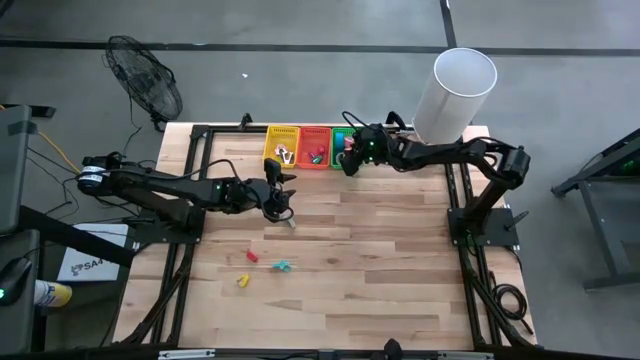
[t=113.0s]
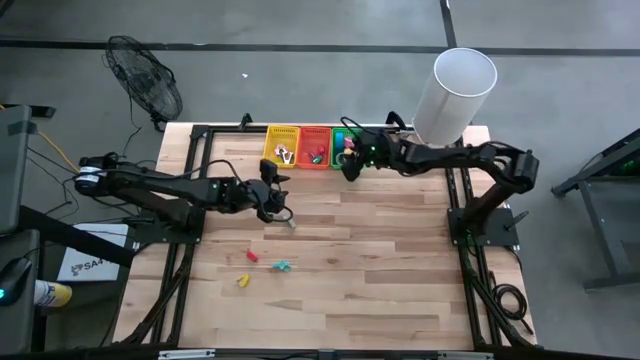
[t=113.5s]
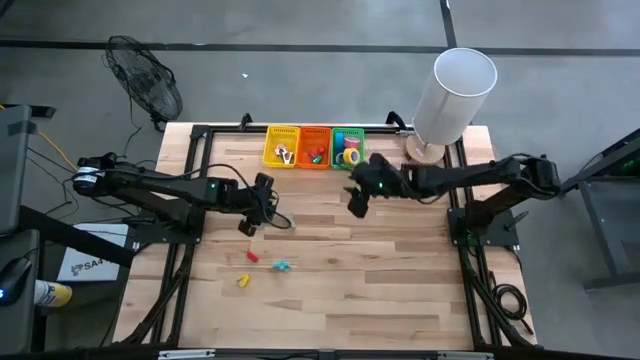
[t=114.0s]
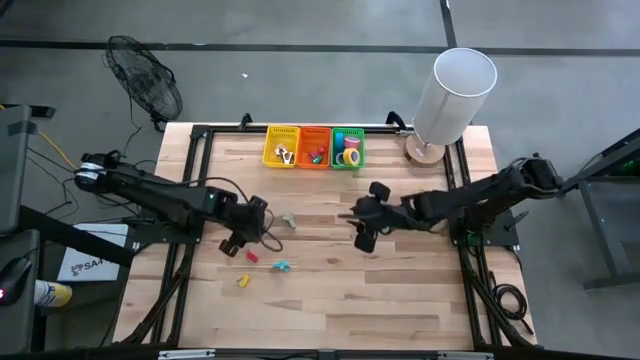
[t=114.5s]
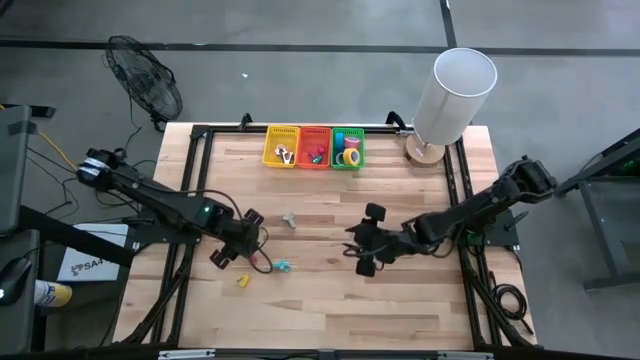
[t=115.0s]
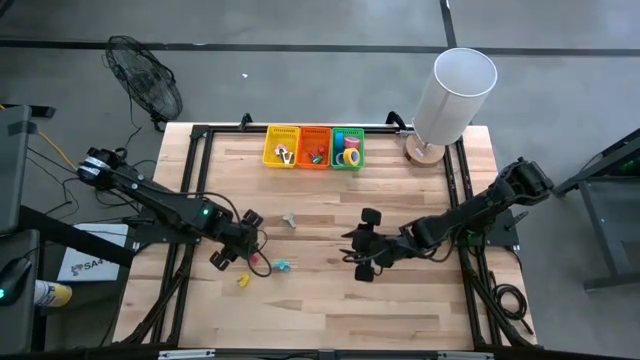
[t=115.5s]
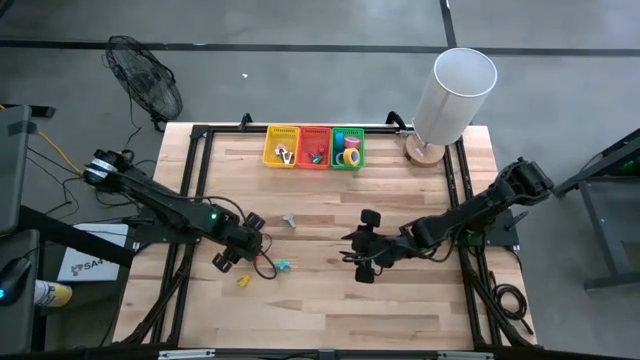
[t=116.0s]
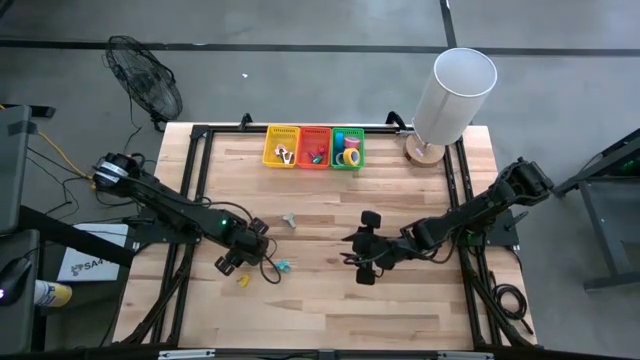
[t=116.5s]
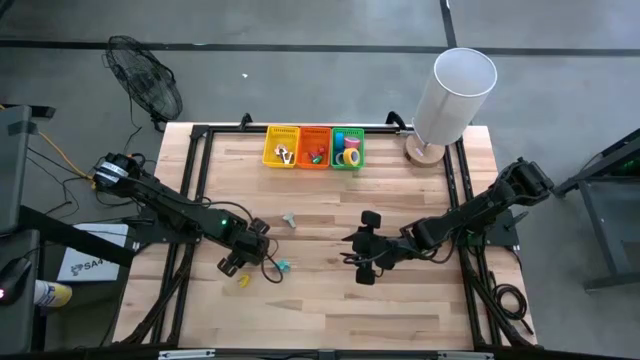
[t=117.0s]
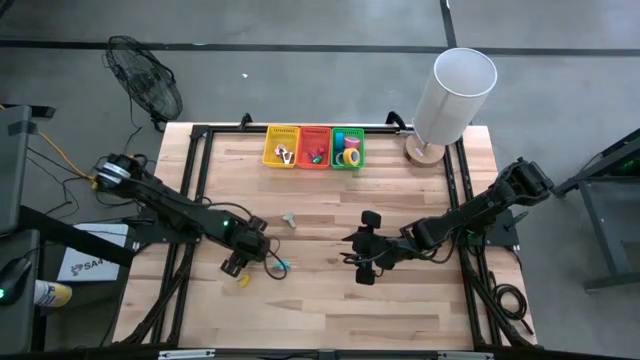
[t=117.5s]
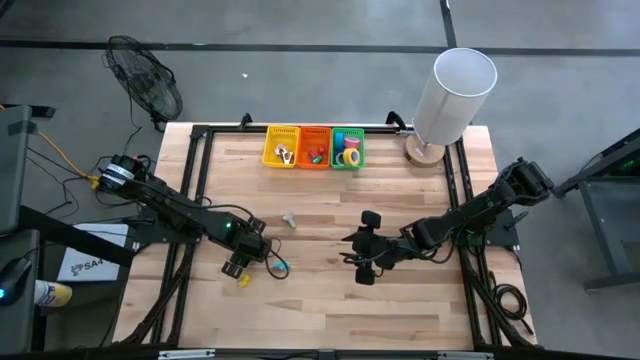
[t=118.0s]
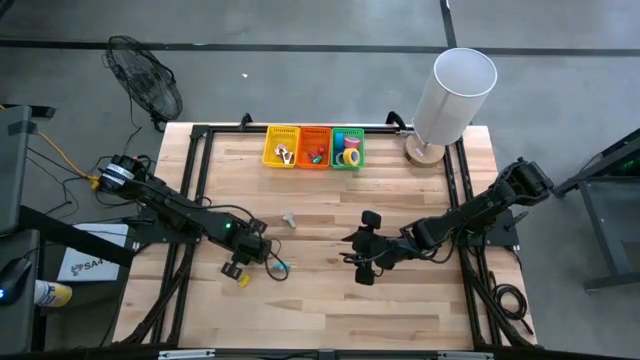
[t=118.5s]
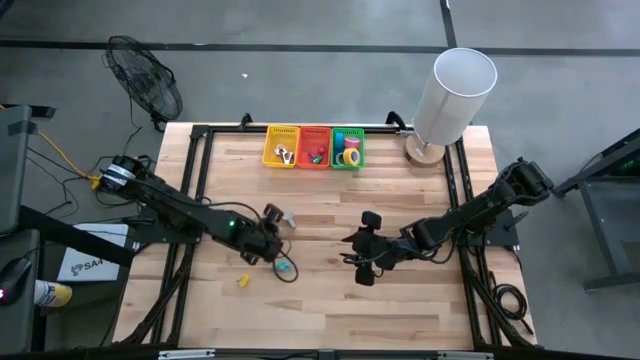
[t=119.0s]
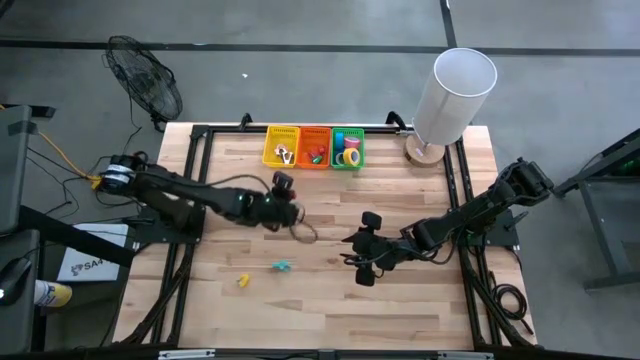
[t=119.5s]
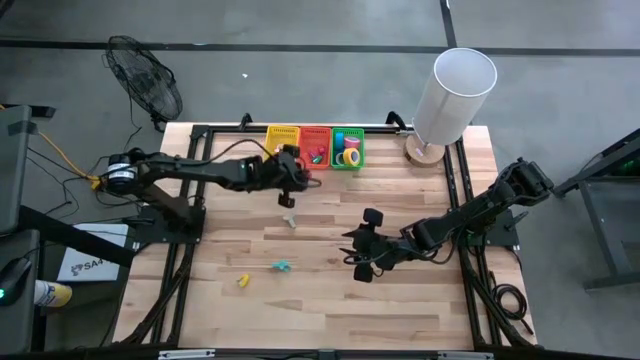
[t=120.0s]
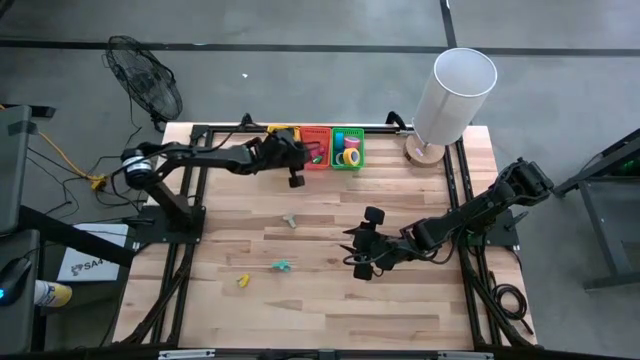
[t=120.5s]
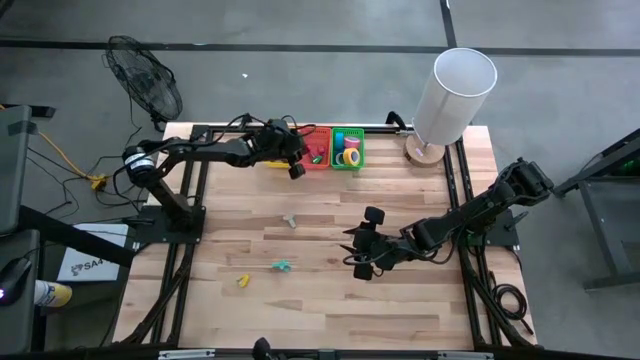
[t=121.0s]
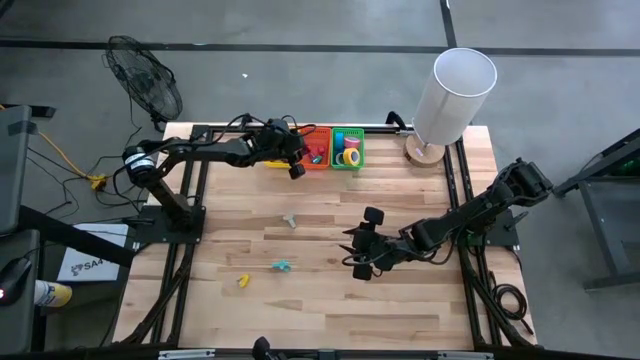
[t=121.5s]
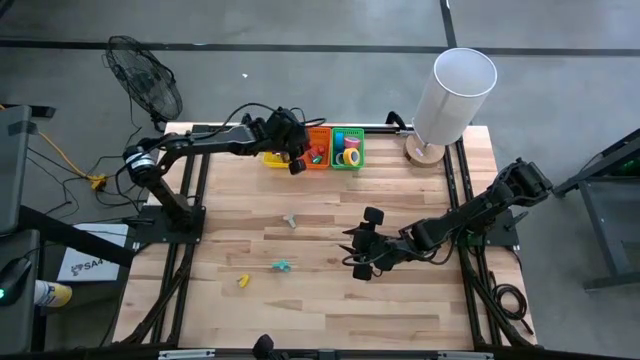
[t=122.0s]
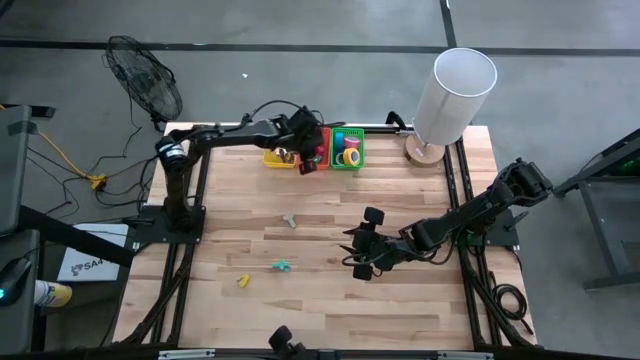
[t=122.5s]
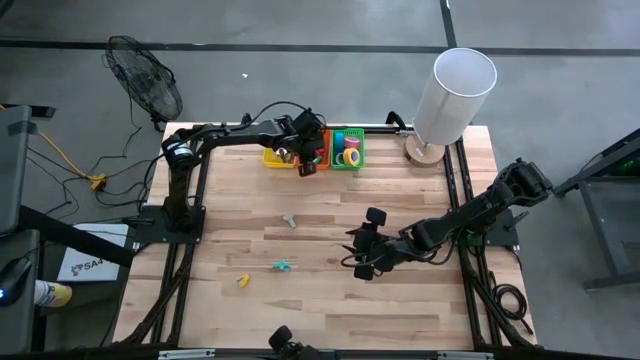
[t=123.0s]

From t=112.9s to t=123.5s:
Task: Pick and place Stapler, Stapler remover, tape
Put the red stapler into the orange basket

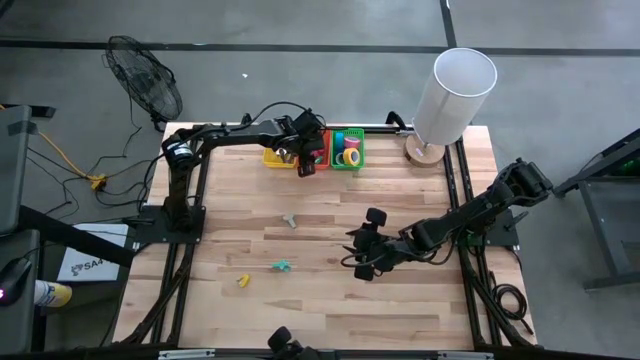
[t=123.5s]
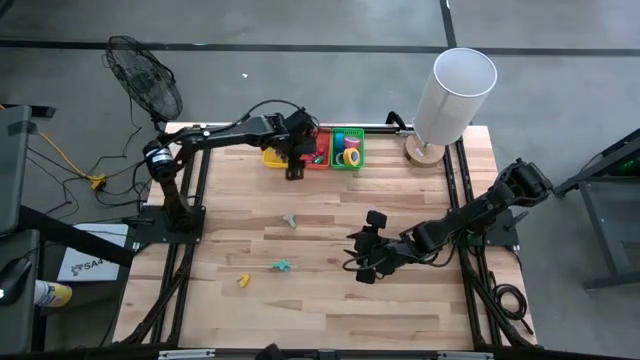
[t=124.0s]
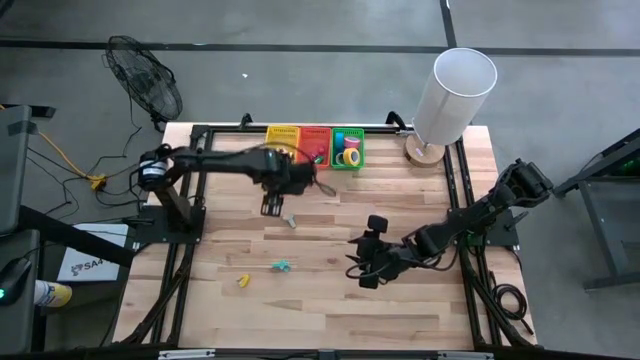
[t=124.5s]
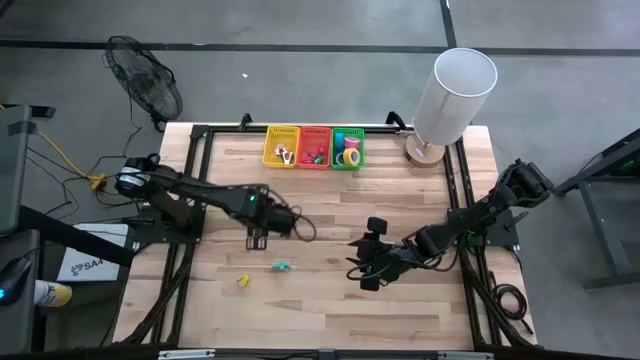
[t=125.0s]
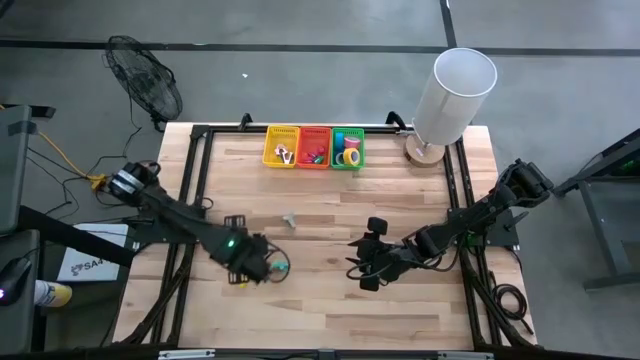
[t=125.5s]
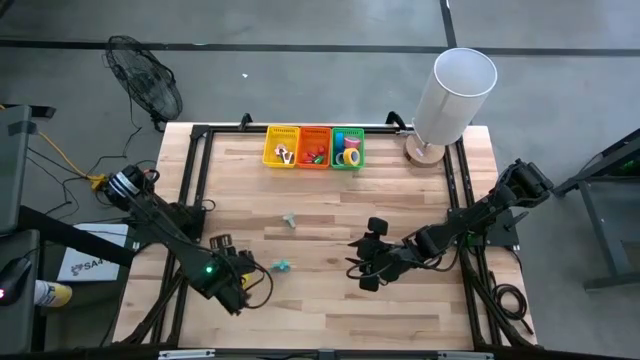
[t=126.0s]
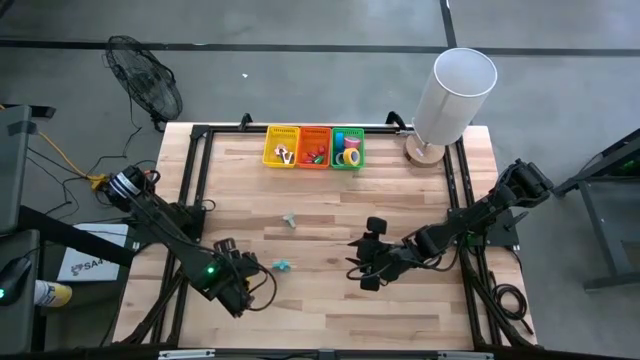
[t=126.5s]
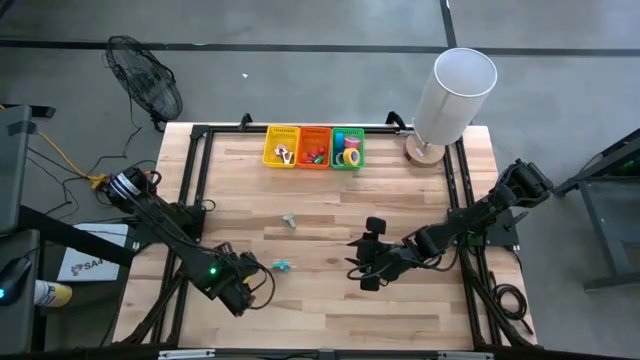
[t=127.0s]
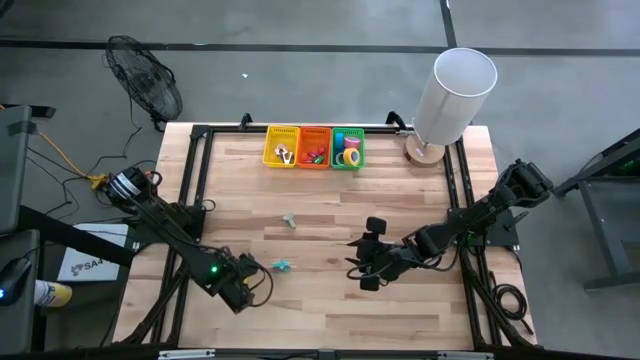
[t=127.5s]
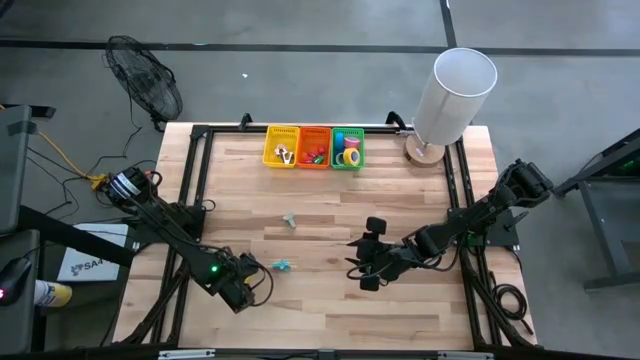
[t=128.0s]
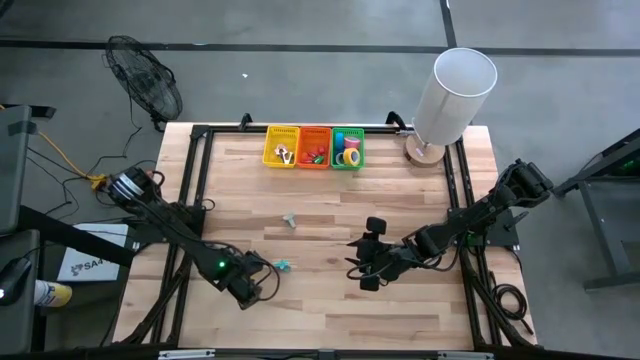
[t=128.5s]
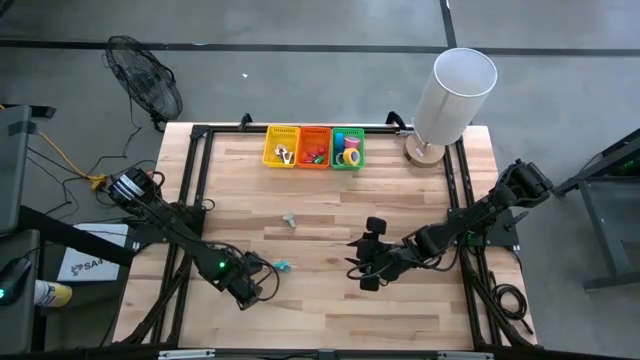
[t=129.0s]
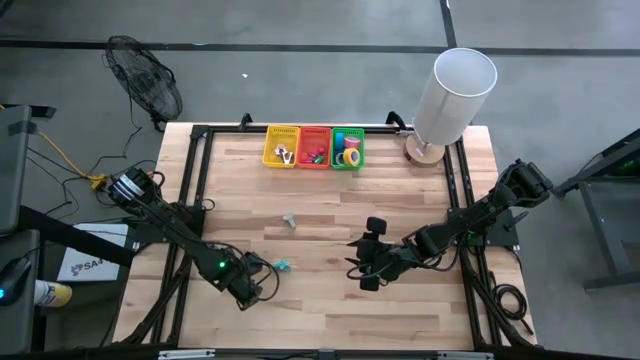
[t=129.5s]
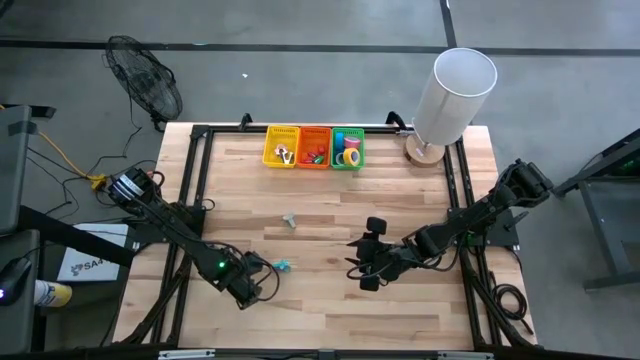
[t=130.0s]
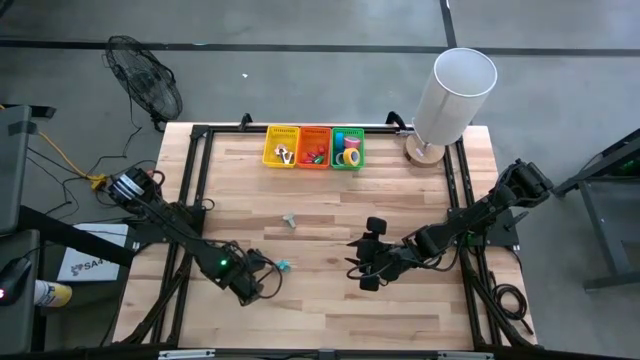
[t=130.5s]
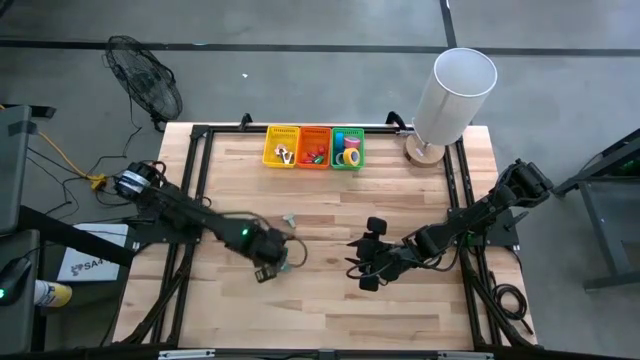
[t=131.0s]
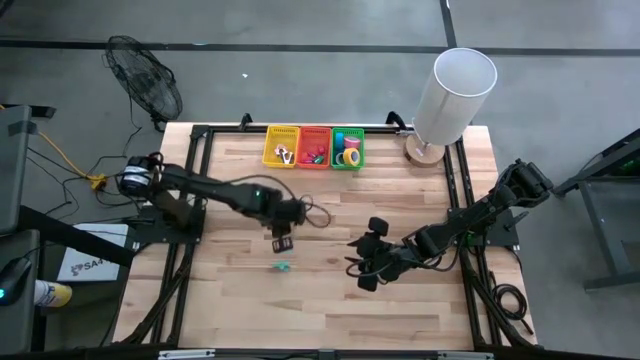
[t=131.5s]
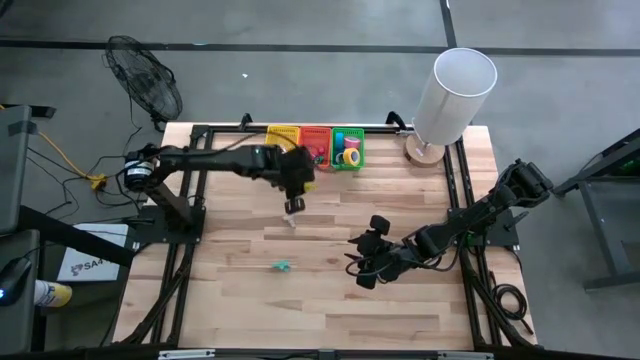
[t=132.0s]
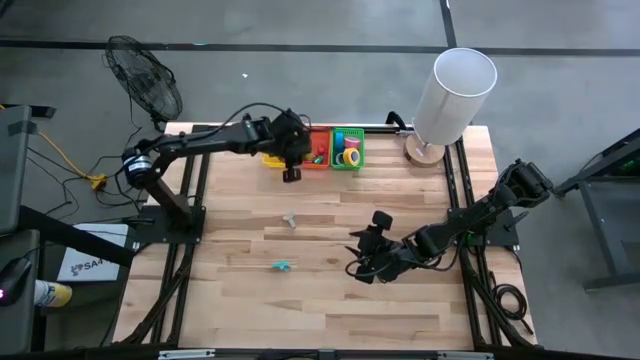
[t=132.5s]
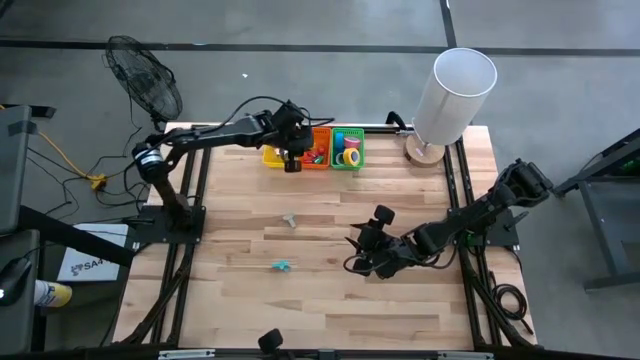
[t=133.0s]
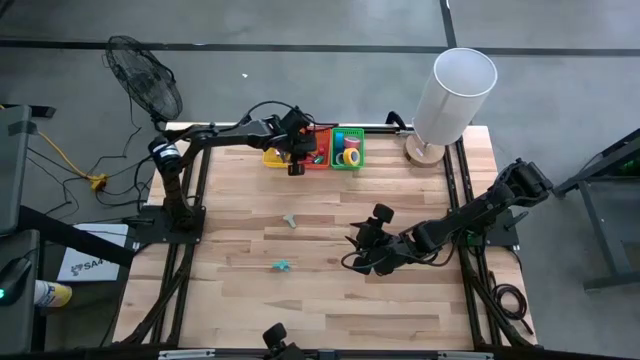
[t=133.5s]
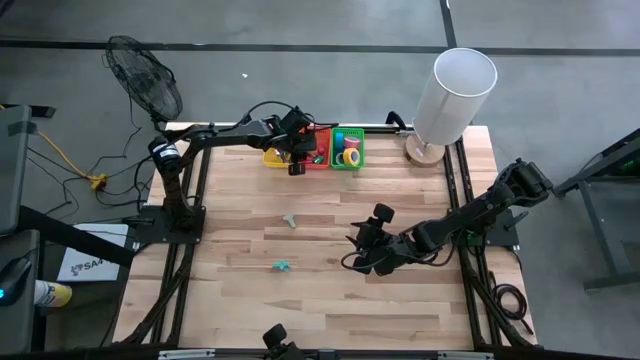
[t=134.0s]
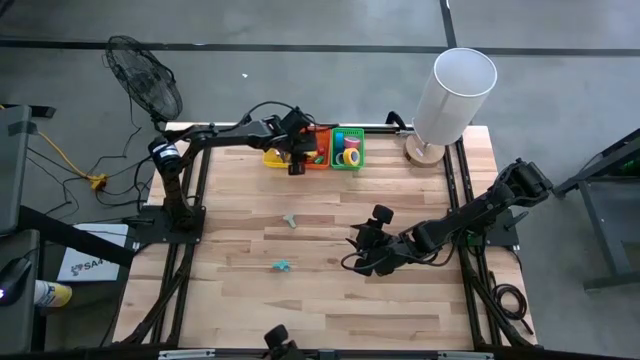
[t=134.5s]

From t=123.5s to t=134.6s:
Put the yellow stapler into the orange basket
